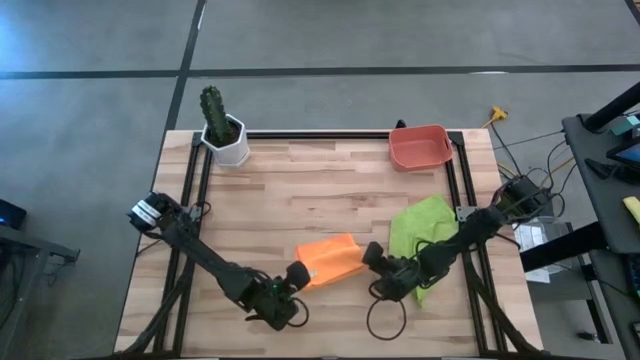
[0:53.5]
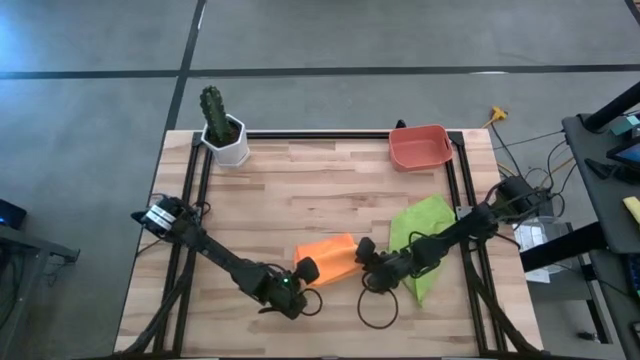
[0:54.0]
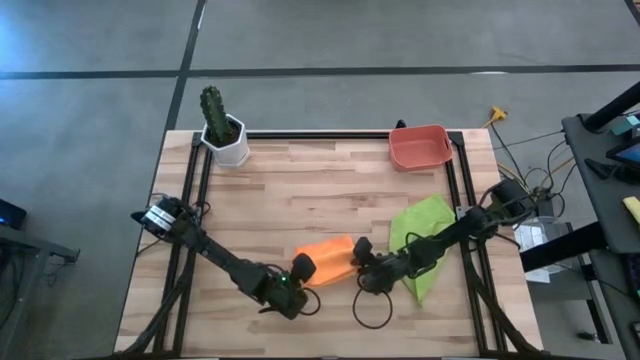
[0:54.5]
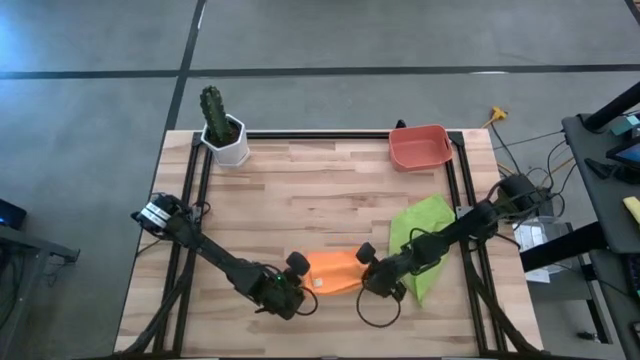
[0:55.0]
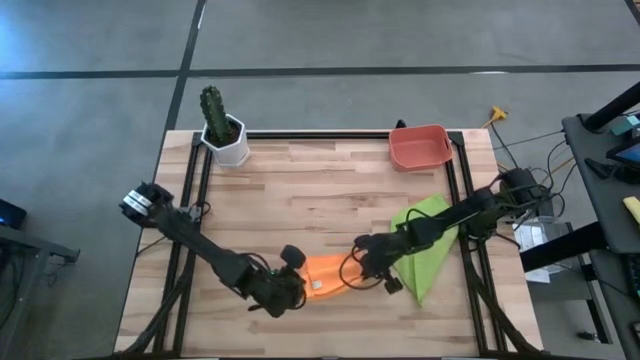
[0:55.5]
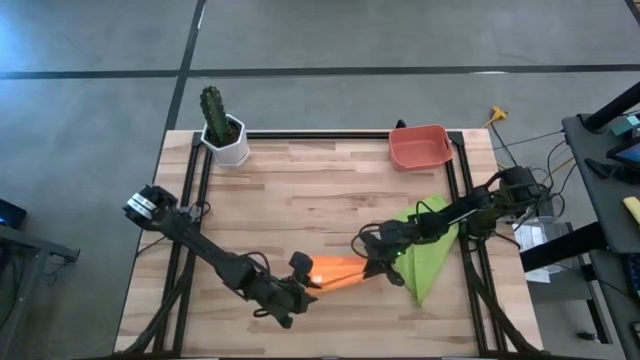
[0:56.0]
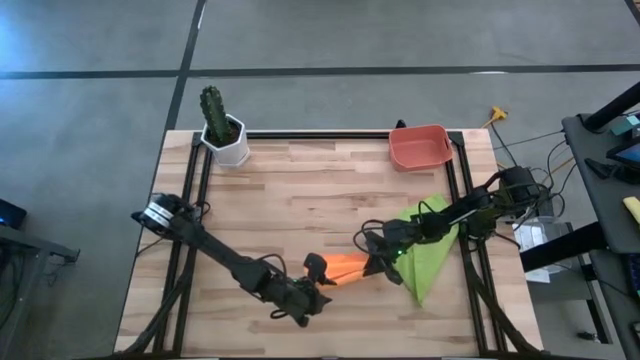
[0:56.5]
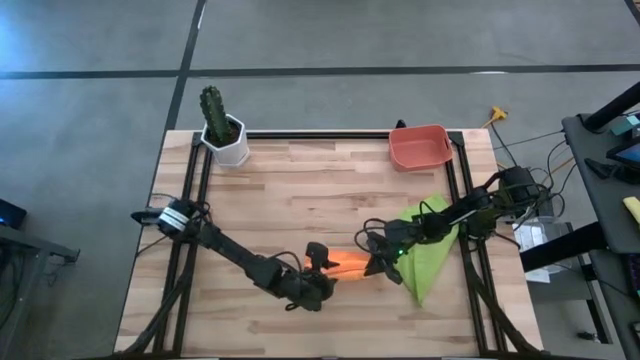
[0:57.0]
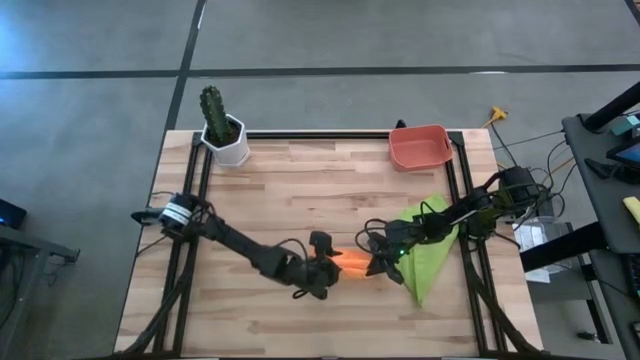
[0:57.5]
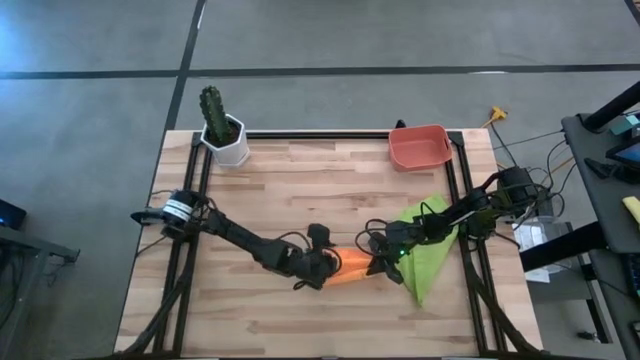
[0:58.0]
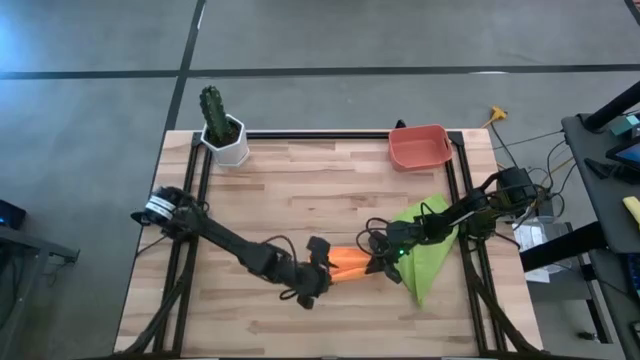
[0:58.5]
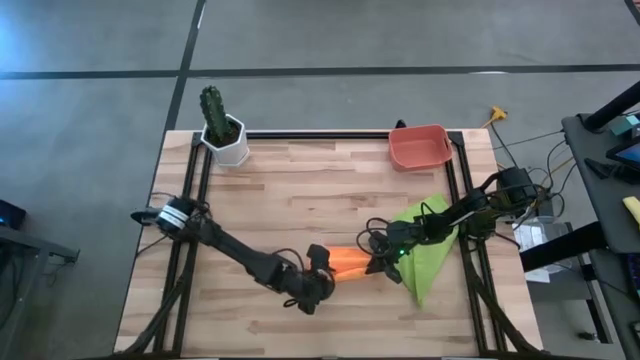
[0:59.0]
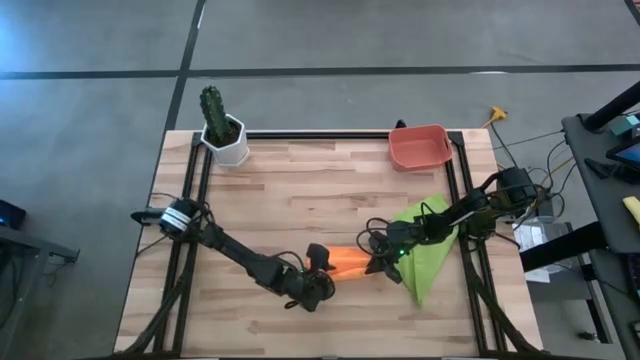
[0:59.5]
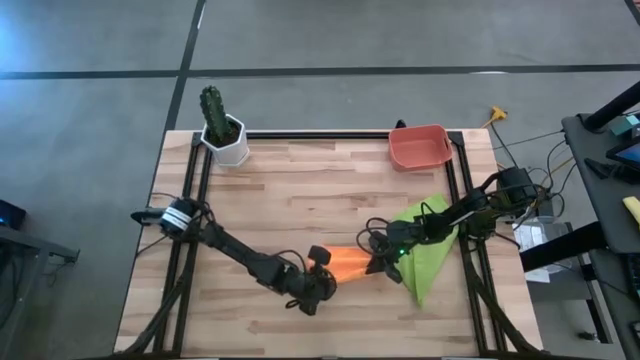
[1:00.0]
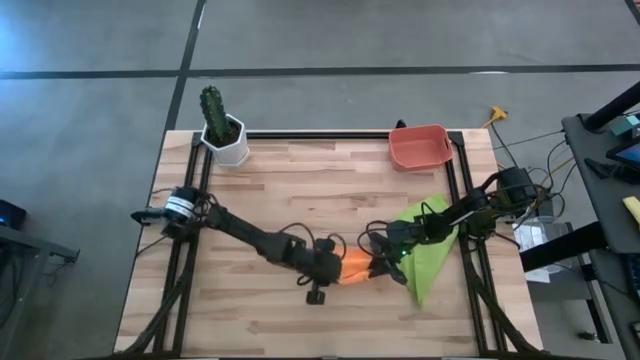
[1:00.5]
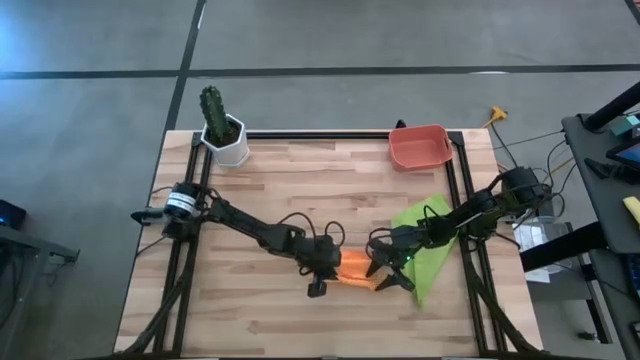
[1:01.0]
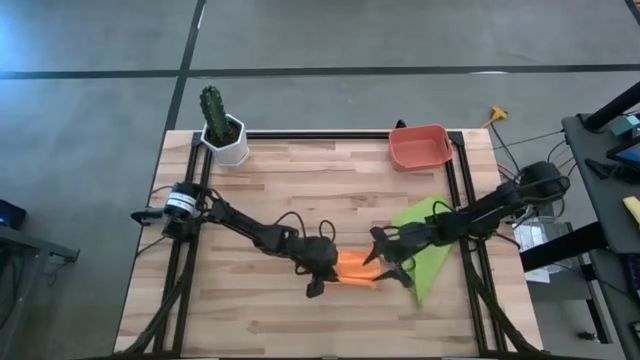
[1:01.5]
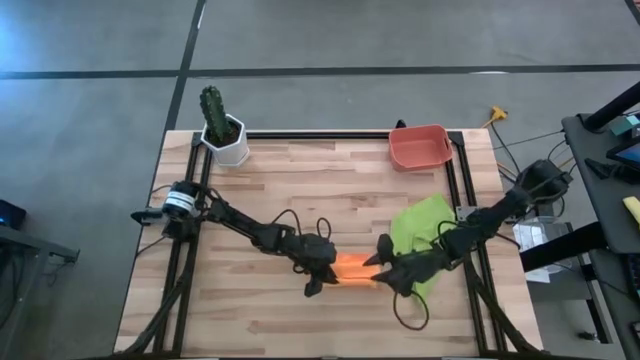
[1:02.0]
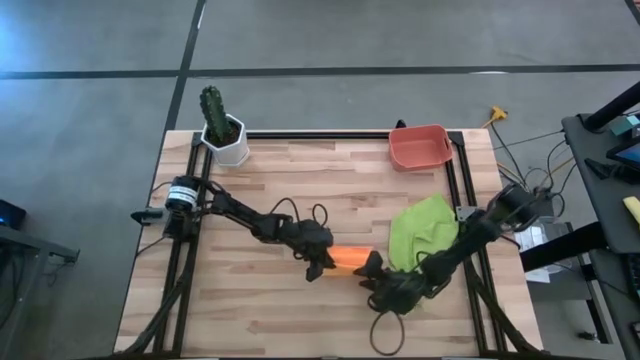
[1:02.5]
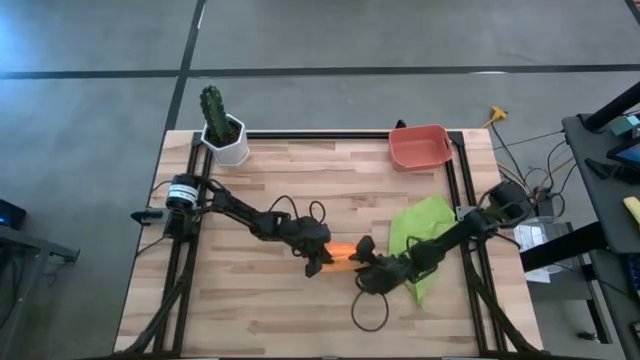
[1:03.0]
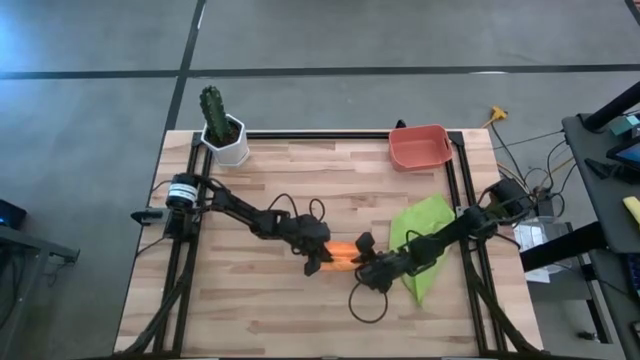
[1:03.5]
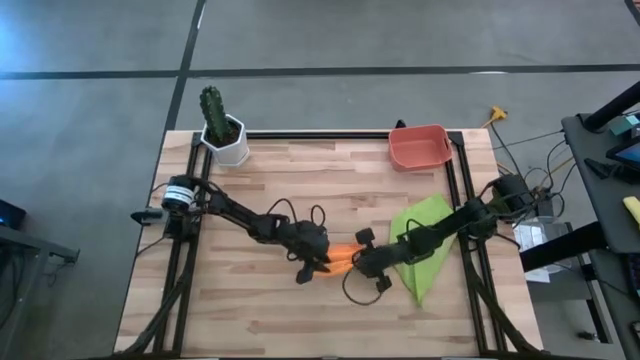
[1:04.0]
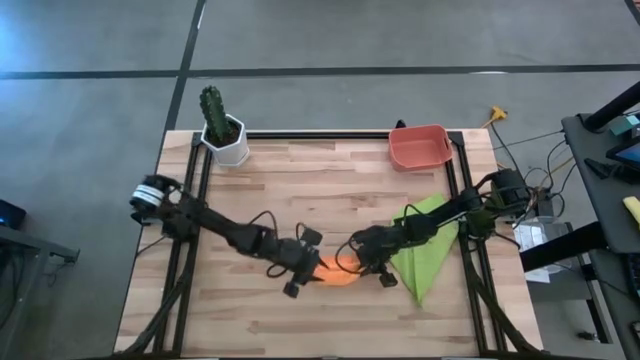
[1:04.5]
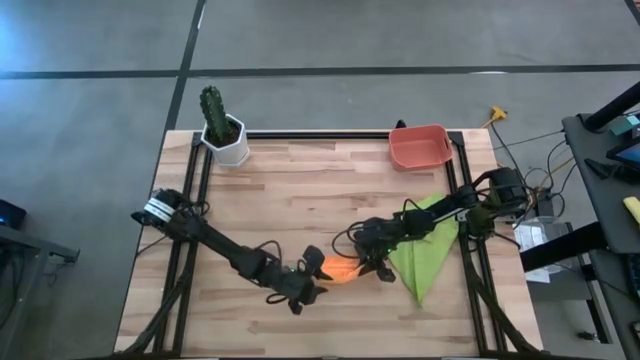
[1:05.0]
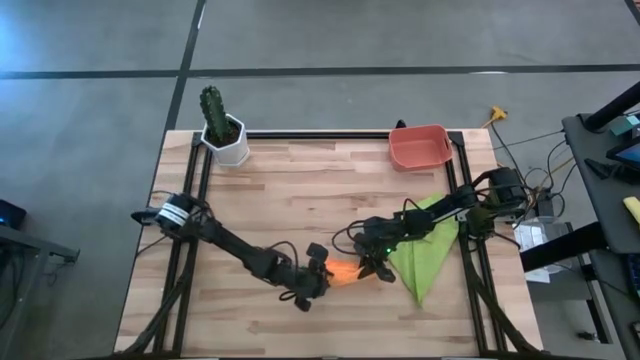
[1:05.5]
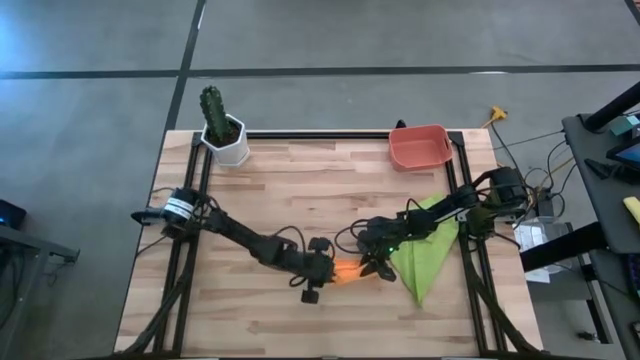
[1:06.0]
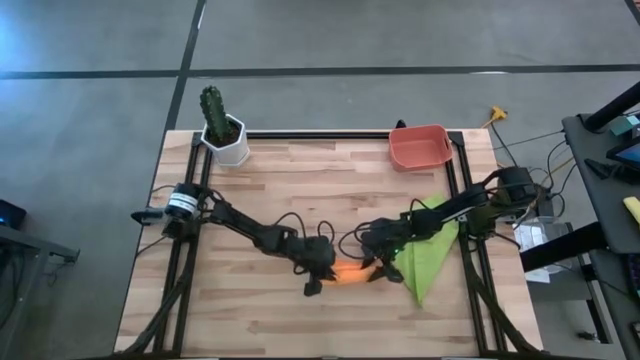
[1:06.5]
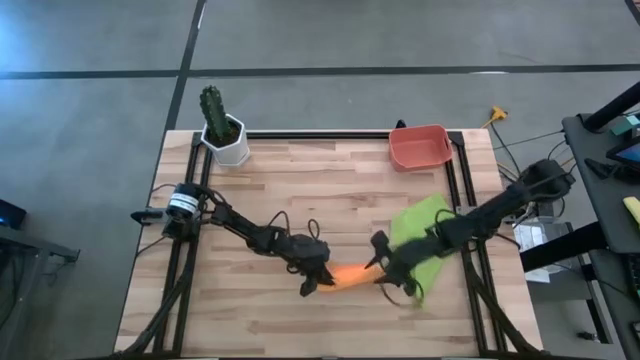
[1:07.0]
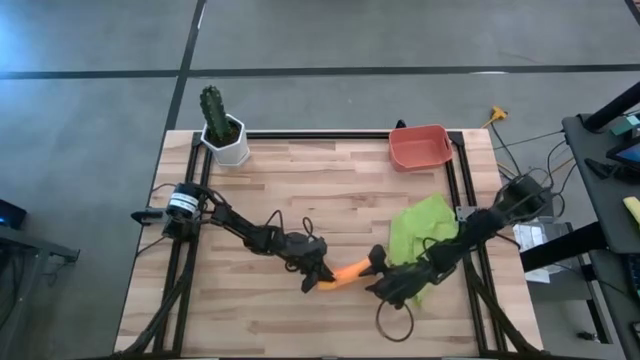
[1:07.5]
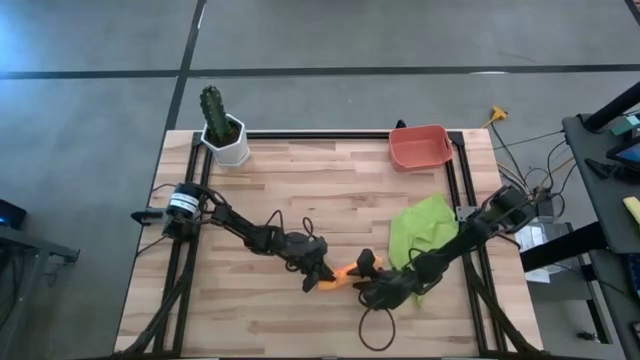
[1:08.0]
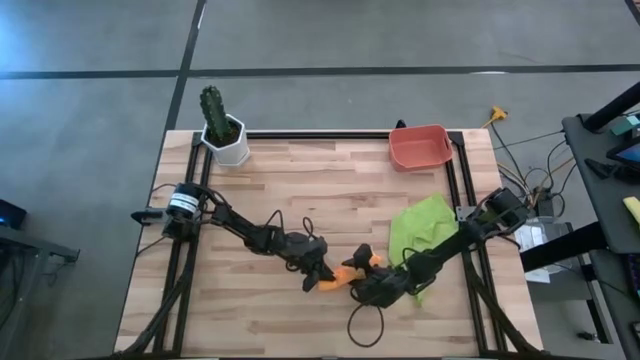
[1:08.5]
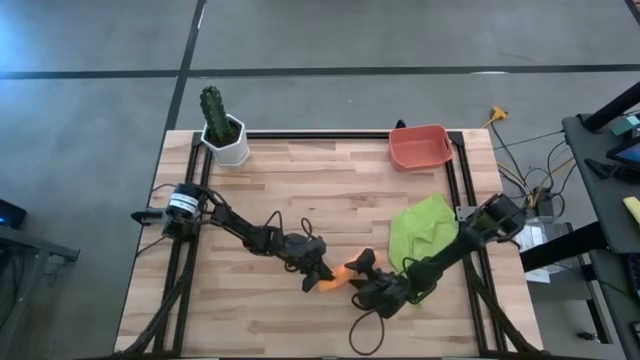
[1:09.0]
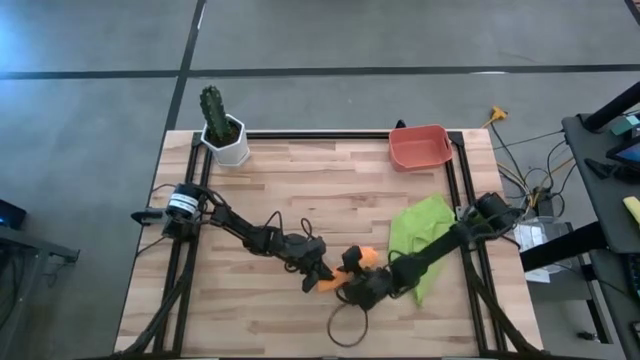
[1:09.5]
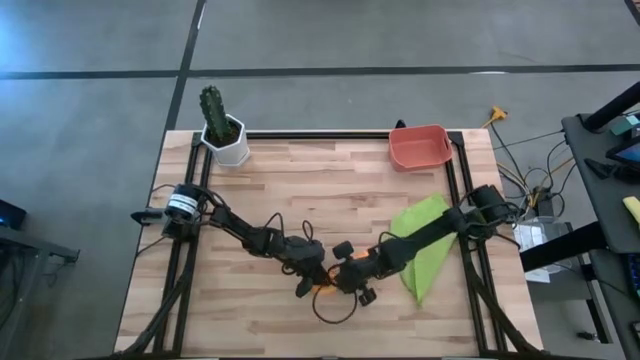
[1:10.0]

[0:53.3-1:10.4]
Task: Roll microfiber towels into tight, uniform cylinder then place into a basket
Roll the orange microfiber cloth

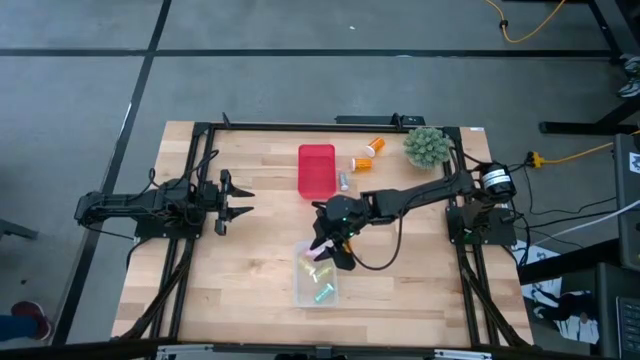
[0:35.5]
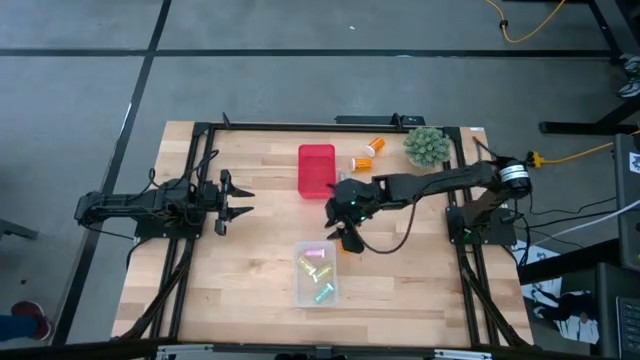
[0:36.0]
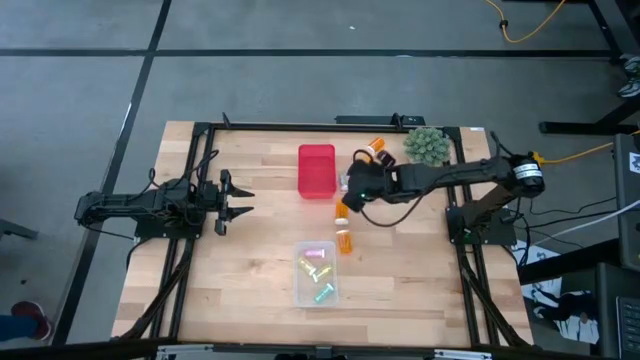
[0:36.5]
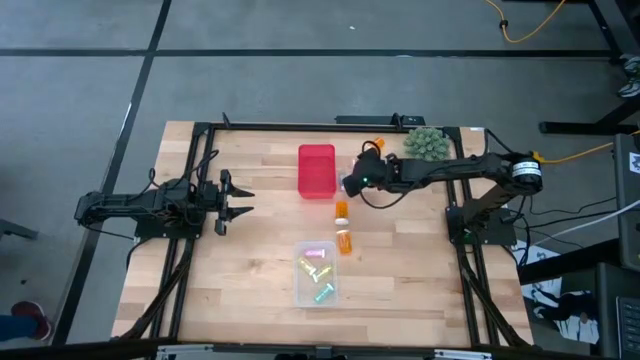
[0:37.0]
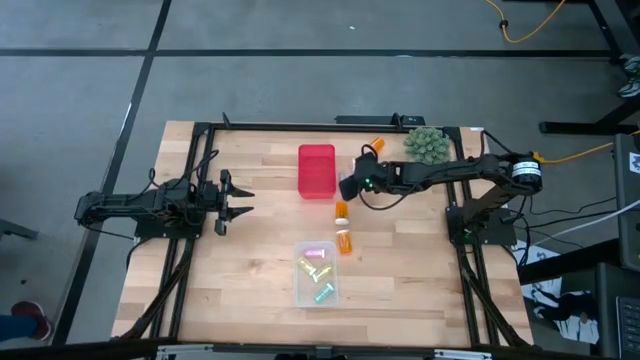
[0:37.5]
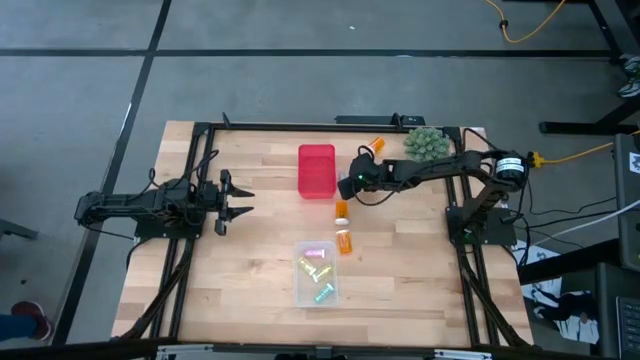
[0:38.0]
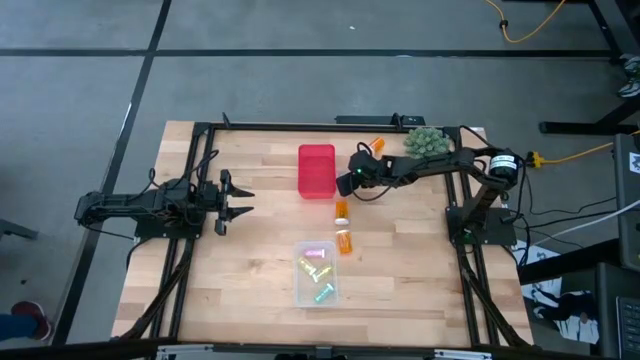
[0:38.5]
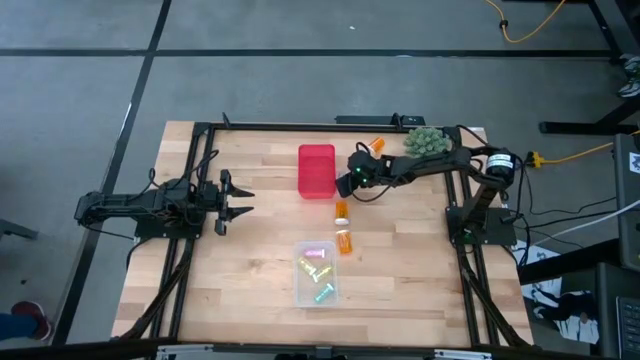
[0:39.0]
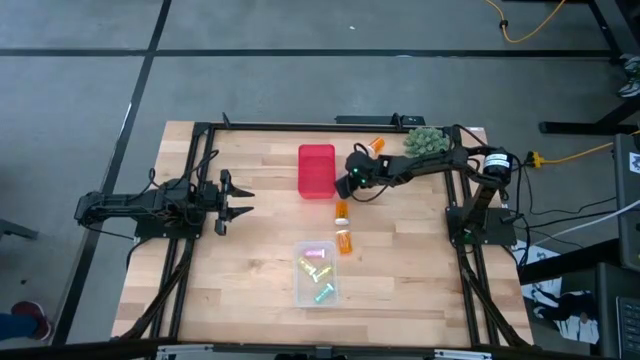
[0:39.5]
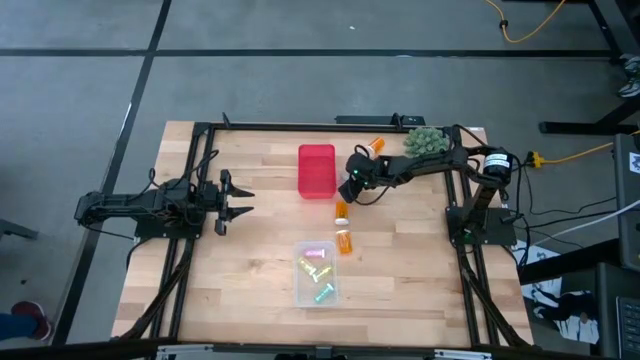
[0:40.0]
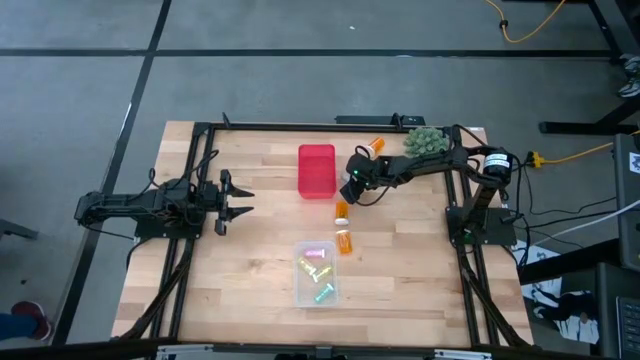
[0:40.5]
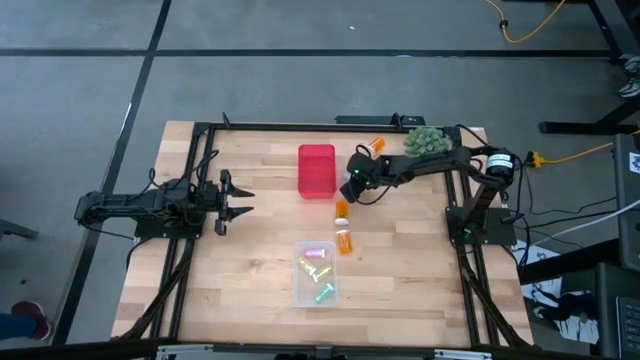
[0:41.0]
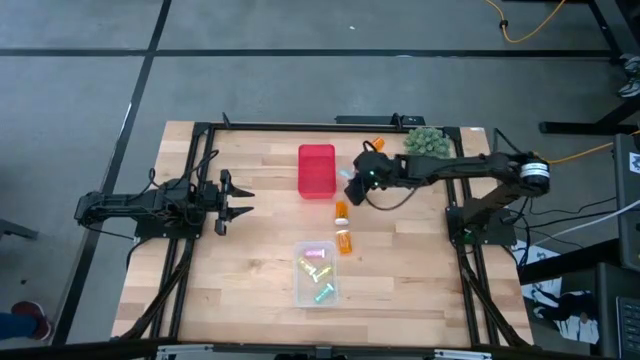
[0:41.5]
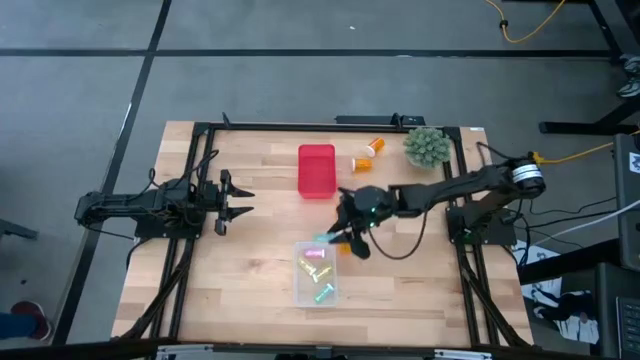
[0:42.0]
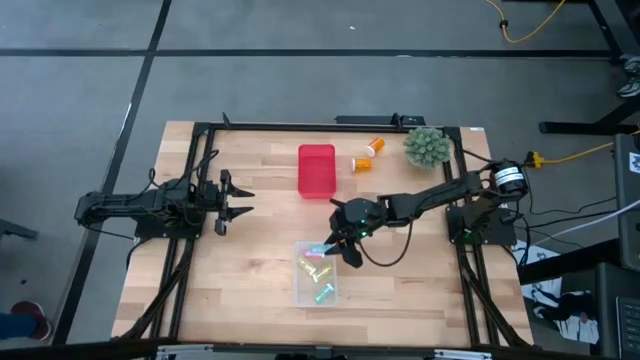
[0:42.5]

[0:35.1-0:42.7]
Task: Pick and place medicine bottles into bin by pill shape (circle, oval)
Put the small blue pill bottle into the transparent bin
